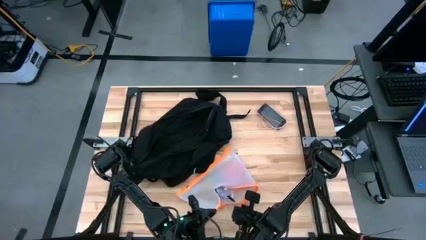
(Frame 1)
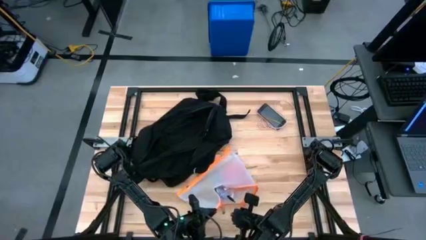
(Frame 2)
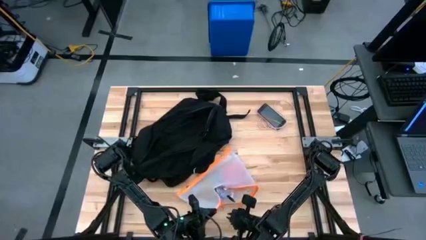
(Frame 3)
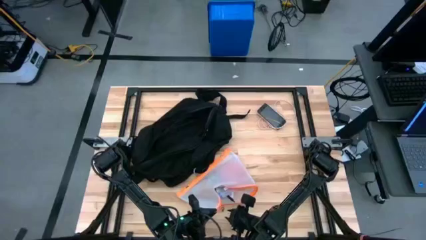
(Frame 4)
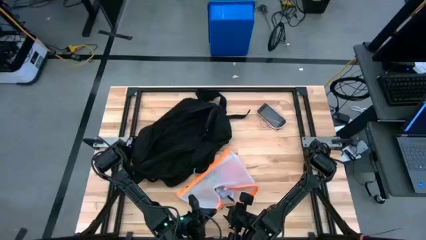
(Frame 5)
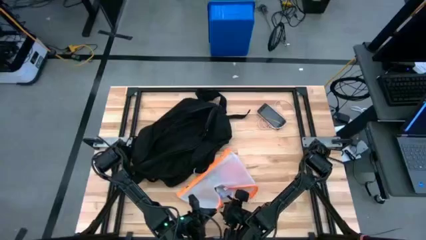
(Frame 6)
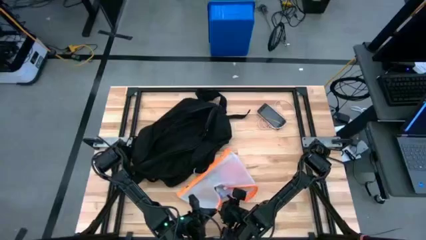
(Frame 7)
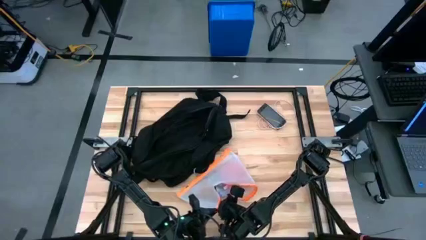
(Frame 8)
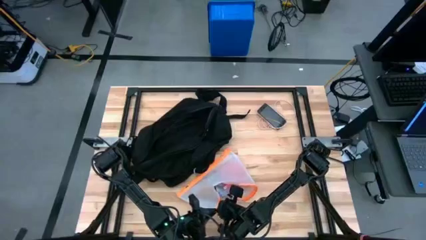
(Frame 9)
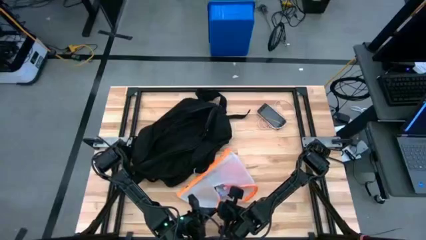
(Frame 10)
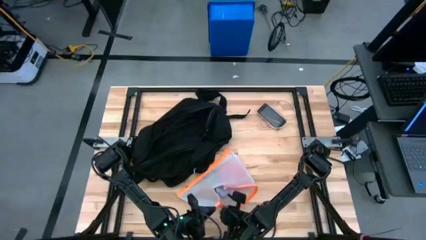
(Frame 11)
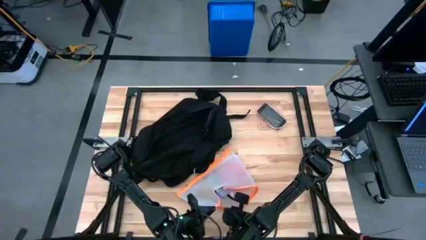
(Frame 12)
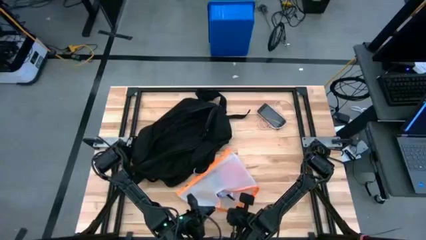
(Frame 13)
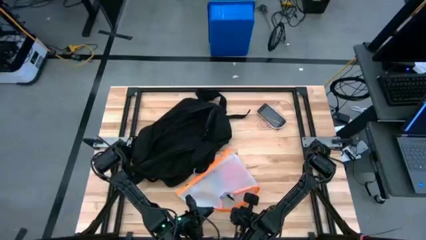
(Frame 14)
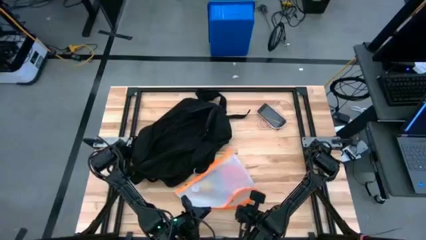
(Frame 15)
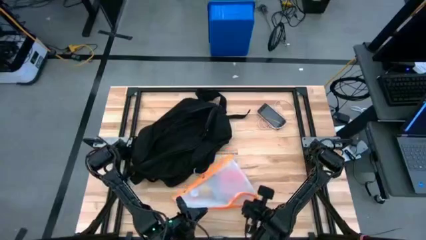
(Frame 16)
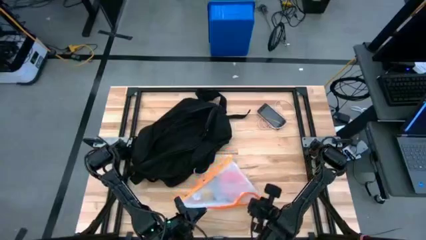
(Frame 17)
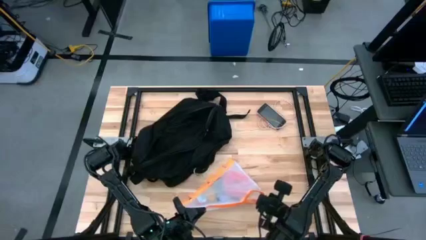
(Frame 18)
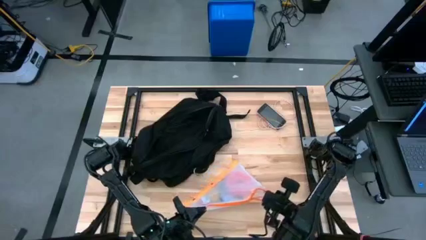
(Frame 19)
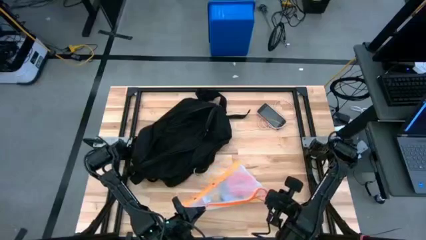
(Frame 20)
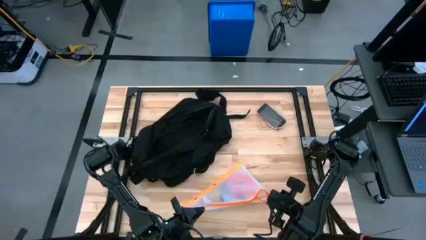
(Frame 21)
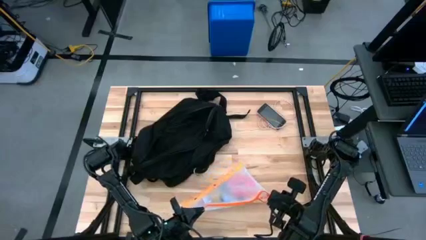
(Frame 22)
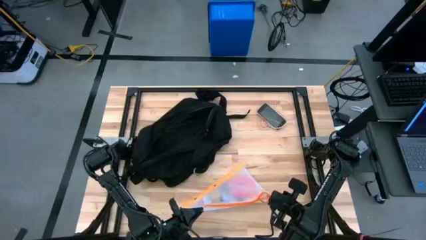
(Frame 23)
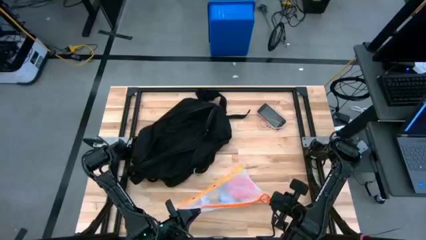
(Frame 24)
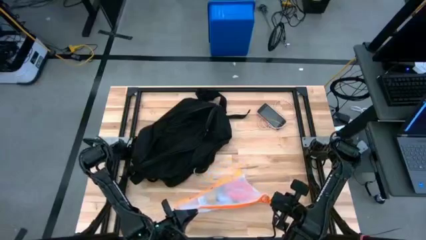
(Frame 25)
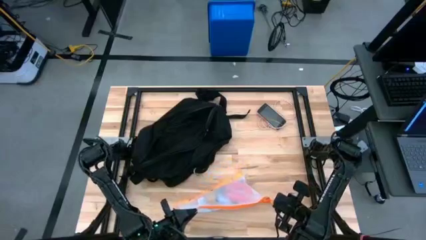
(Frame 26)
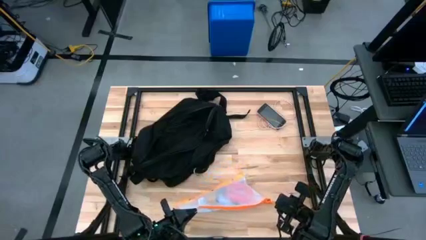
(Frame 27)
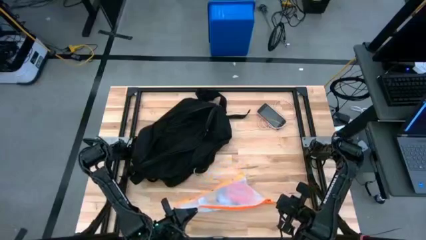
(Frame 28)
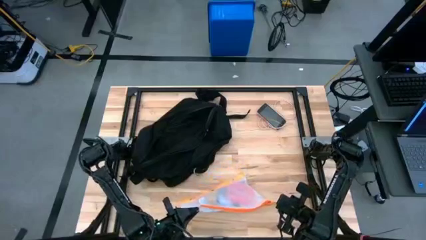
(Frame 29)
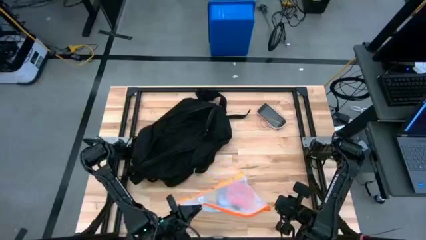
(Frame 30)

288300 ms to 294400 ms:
Task: Unpack backpack
Close the orange zip bag

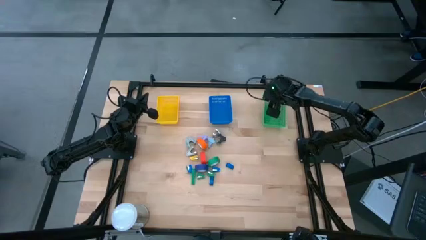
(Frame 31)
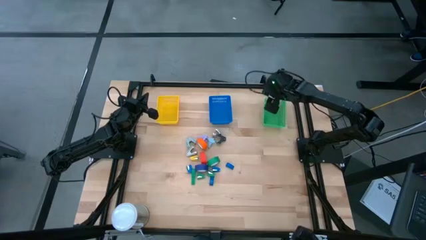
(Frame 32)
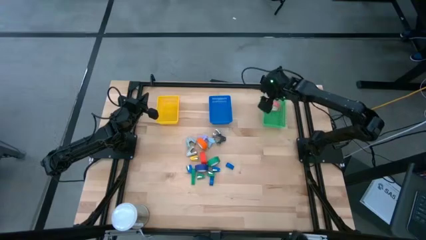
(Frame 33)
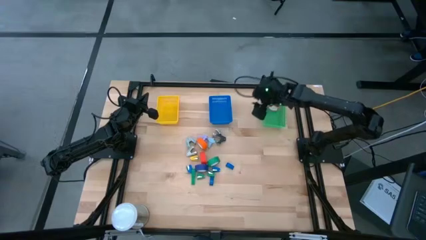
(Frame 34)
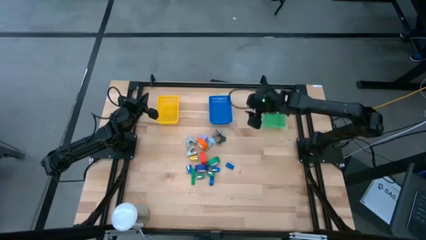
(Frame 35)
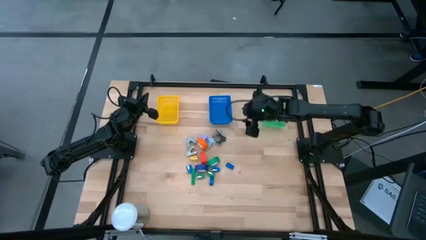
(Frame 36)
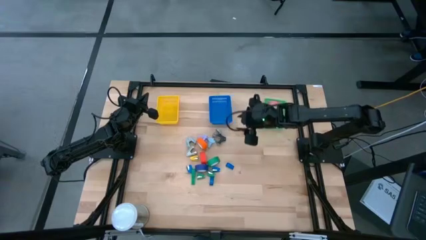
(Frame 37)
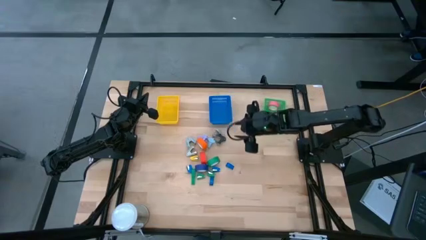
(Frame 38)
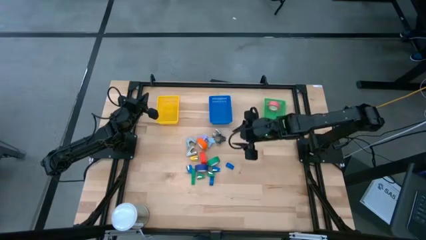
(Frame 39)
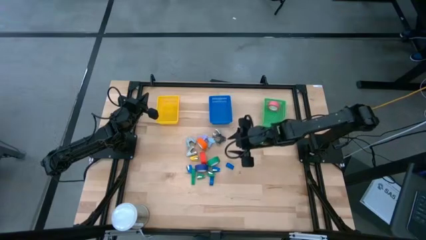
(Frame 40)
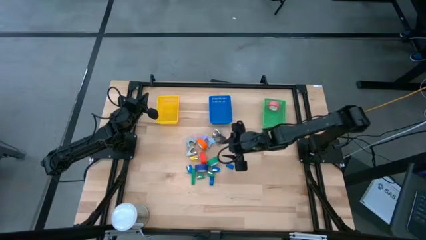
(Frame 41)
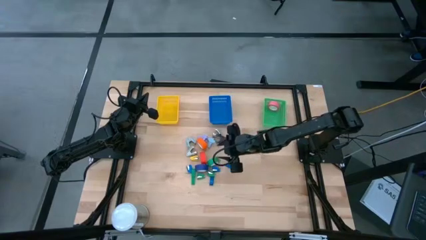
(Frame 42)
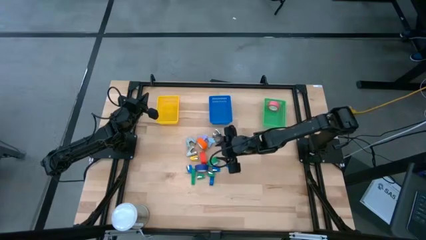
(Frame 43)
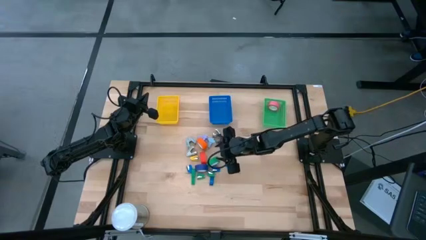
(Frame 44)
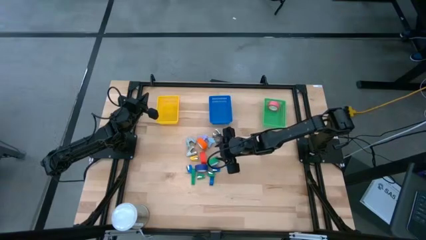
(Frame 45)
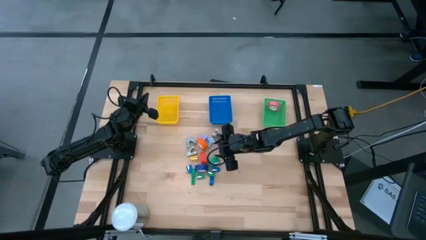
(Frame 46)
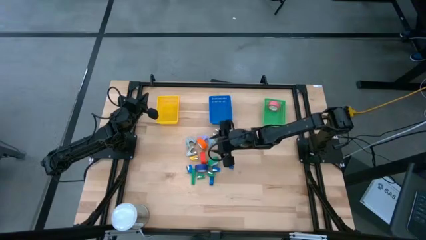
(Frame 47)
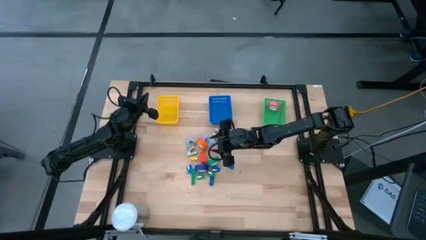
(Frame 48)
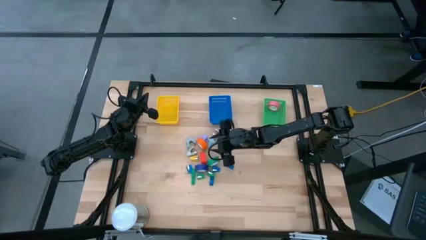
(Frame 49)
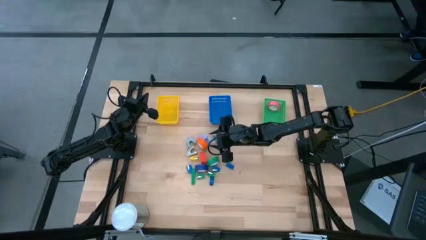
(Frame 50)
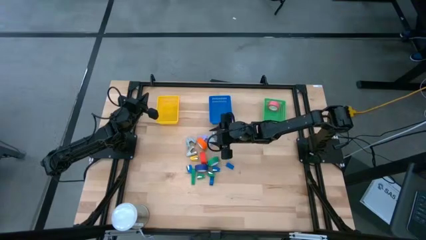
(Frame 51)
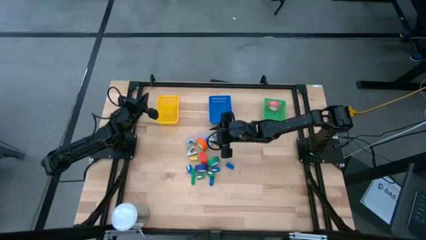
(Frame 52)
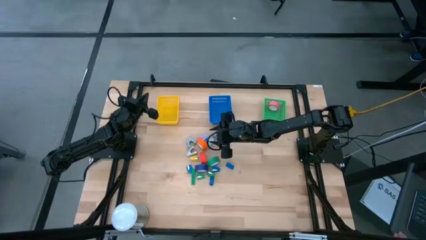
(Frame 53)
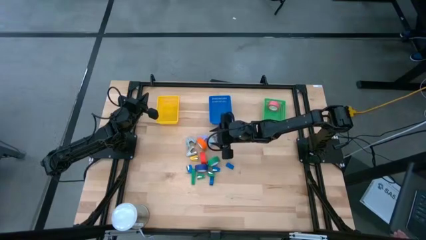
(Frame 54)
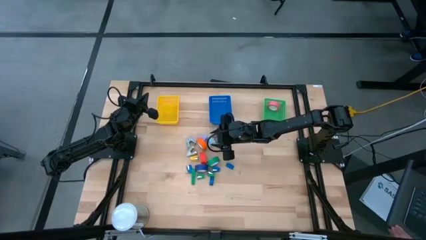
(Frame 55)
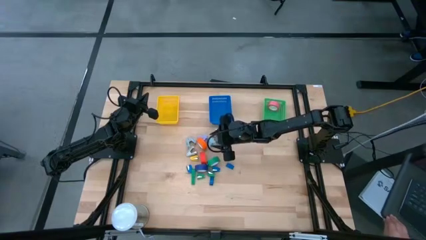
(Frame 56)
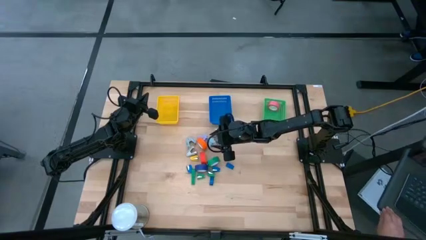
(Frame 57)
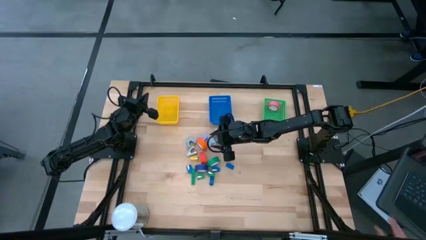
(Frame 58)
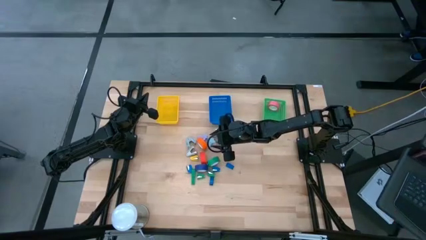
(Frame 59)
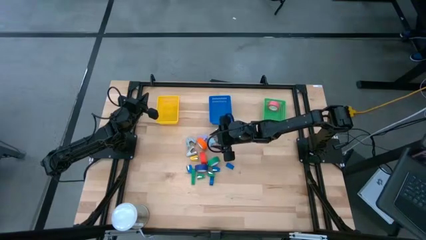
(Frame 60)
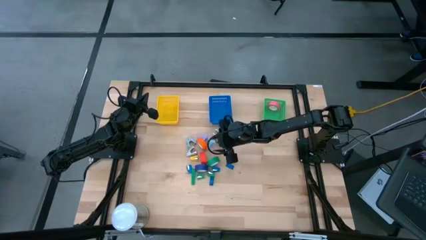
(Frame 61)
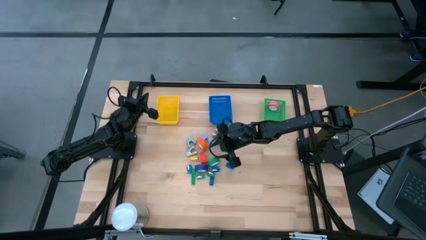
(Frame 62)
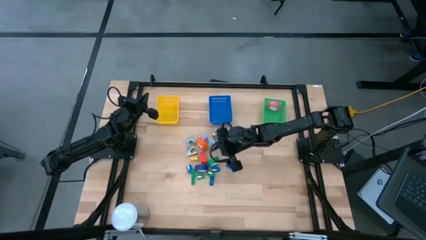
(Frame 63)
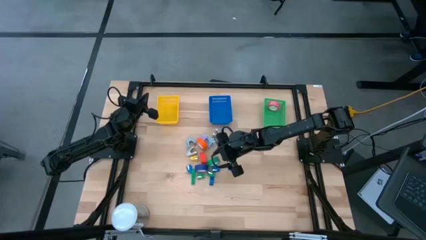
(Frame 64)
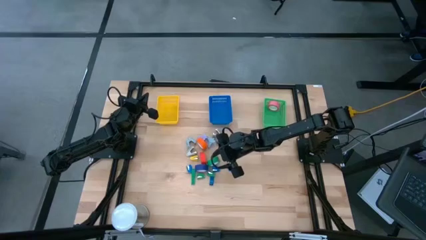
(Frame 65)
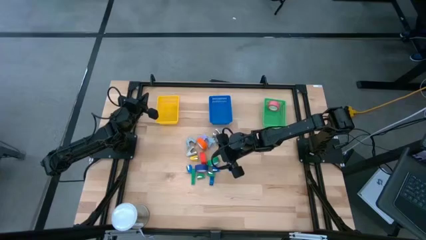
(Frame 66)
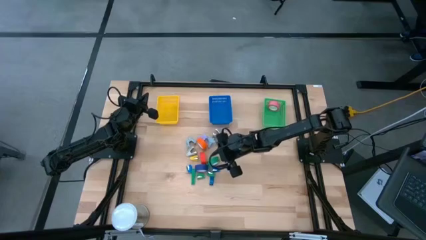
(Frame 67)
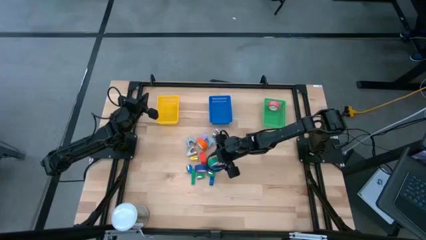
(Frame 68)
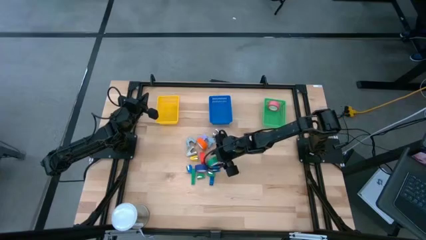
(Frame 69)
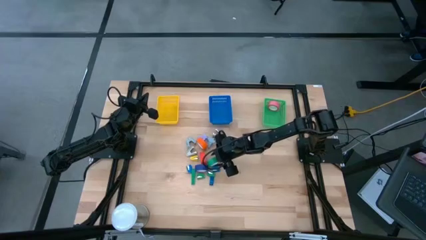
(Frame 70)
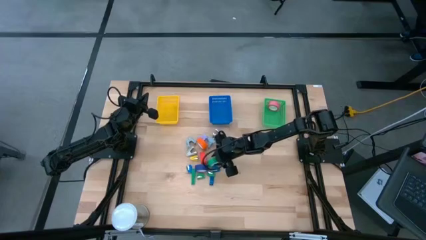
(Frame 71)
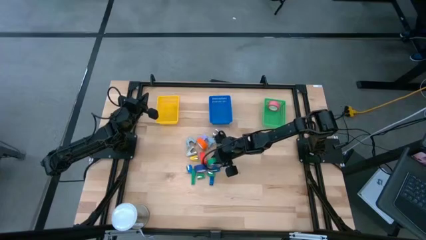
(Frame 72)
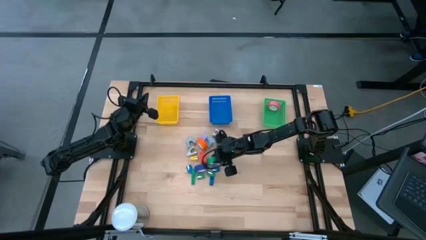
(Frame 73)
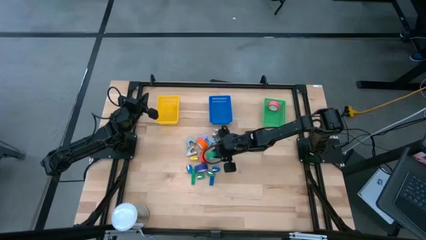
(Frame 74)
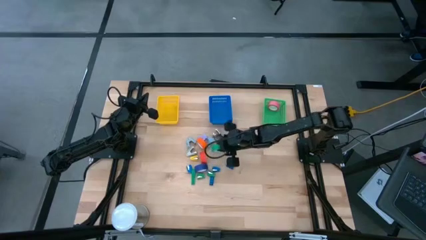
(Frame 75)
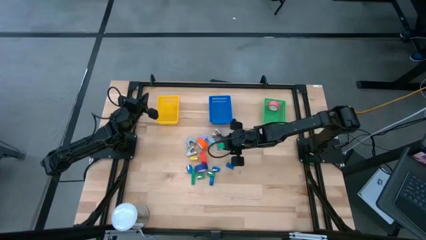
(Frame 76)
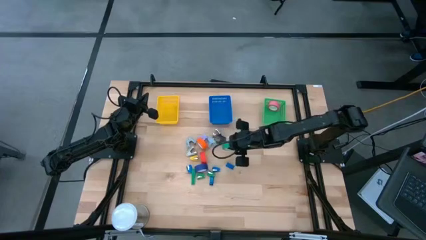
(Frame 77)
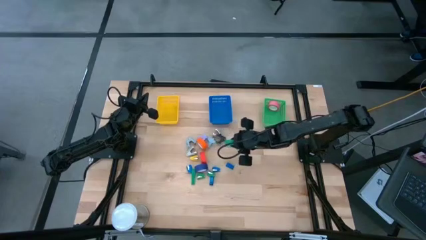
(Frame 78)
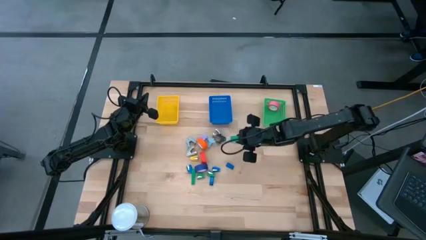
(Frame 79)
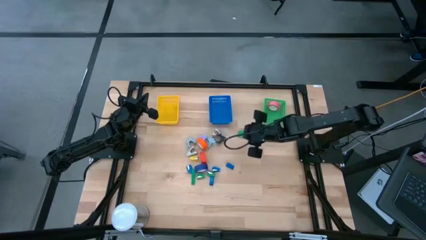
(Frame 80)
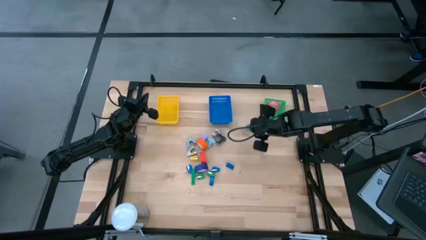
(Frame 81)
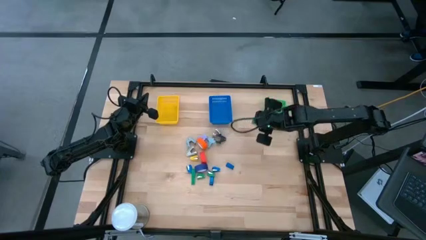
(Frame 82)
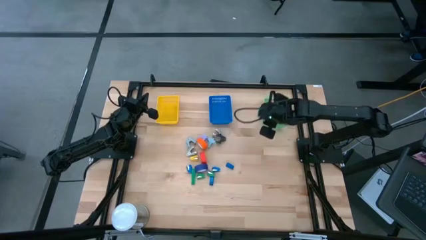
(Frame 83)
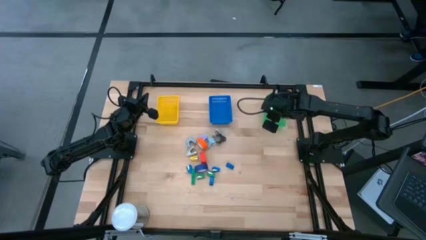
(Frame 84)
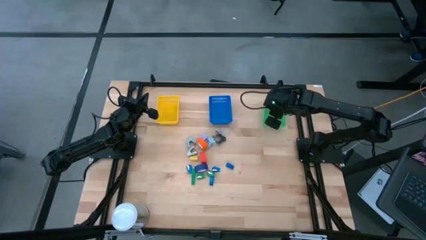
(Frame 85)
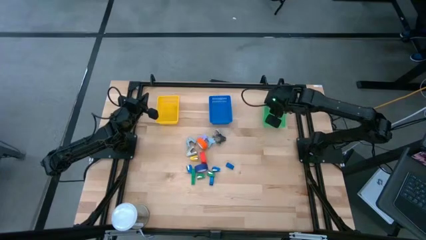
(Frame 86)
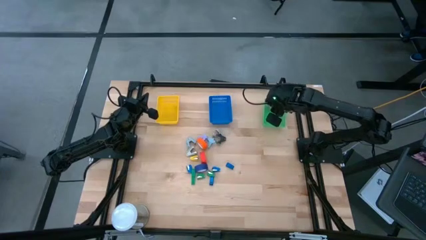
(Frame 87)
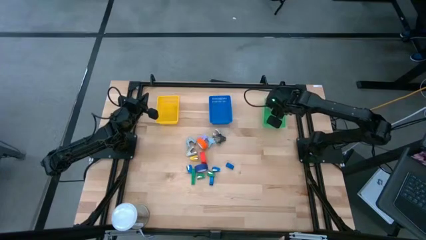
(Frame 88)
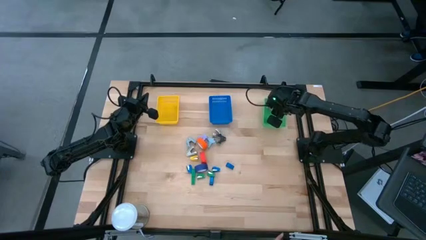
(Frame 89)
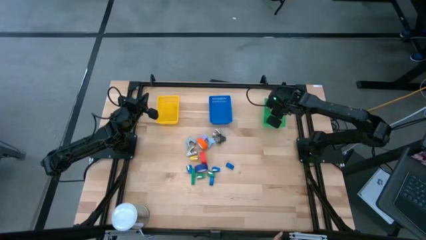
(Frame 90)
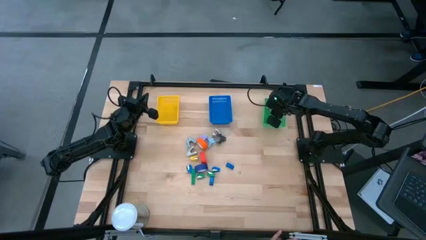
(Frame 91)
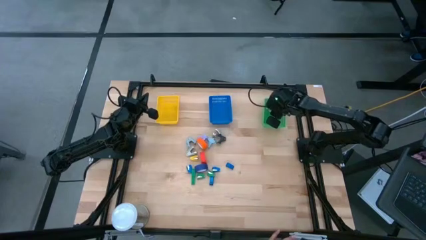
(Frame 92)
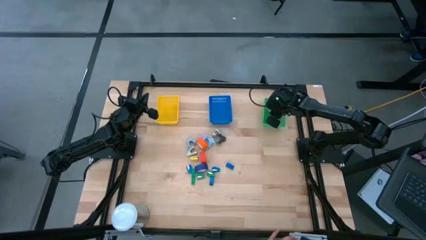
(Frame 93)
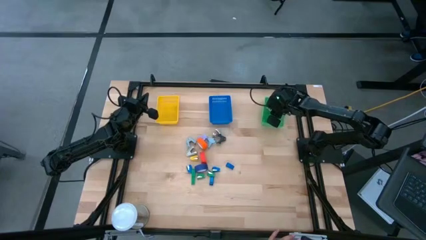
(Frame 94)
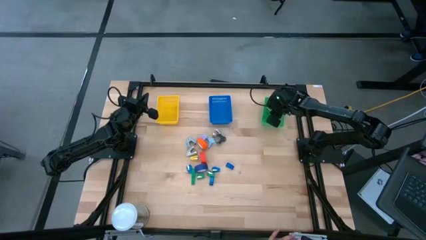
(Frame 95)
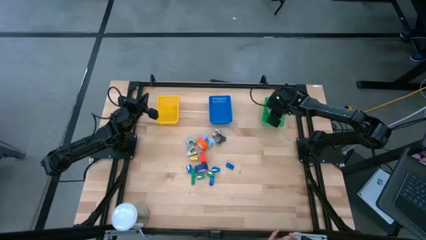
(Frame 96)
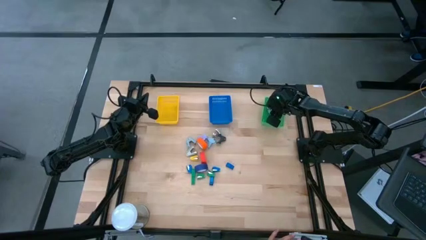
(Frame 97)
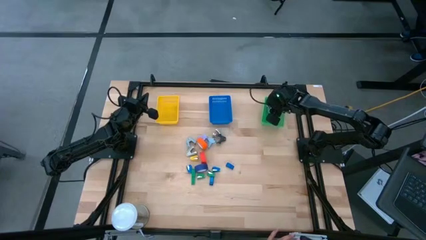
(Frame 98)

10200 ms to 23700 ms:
Task: Pick and place Stapler, Stapler remover, tape
Put the green tape into the green basket
